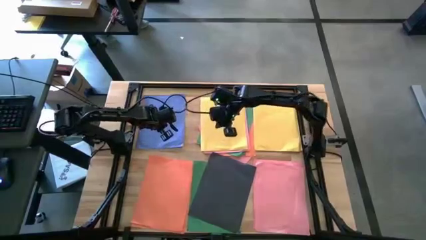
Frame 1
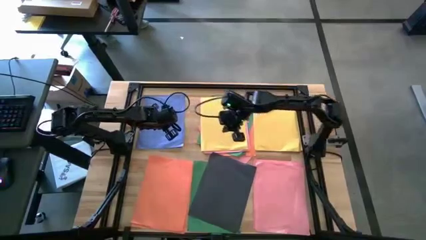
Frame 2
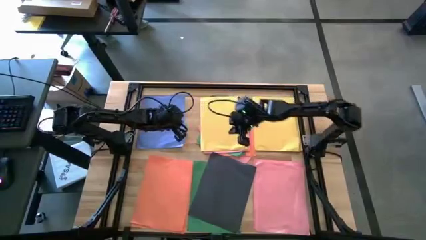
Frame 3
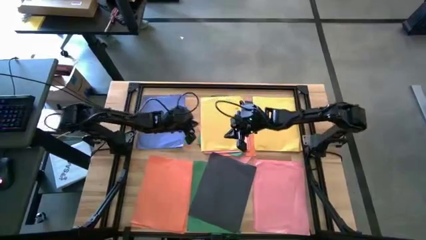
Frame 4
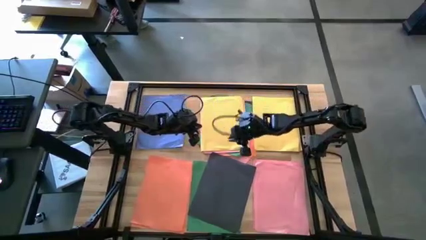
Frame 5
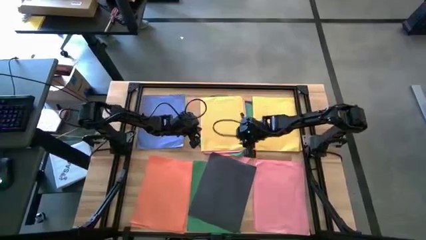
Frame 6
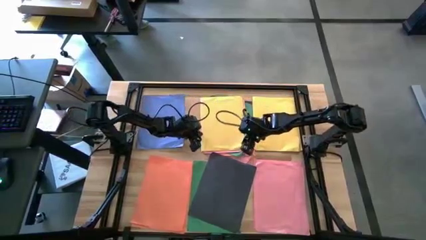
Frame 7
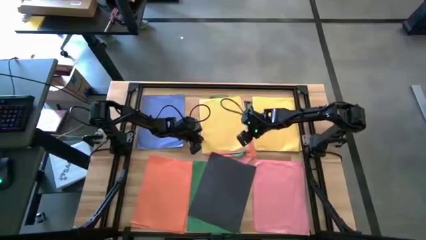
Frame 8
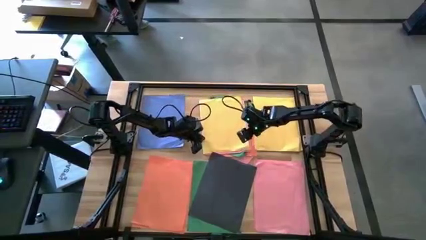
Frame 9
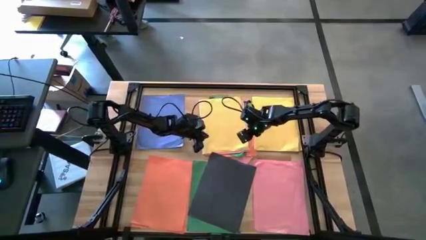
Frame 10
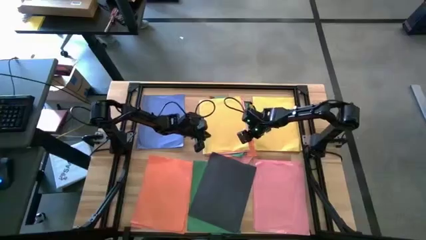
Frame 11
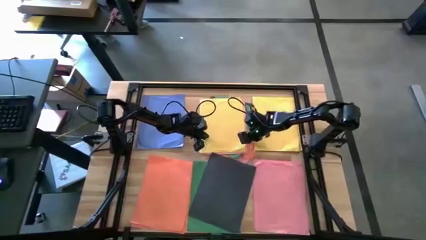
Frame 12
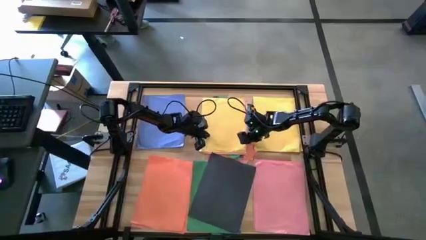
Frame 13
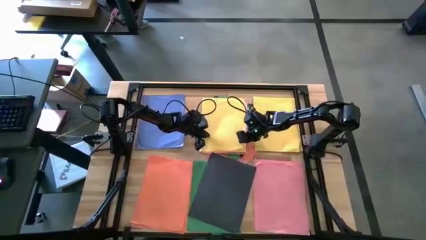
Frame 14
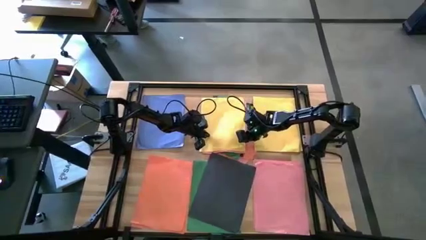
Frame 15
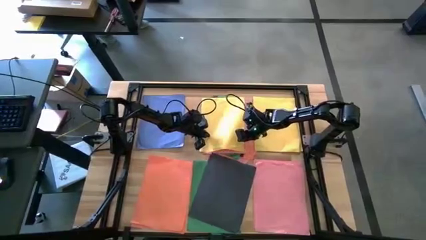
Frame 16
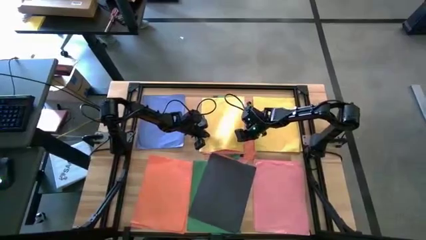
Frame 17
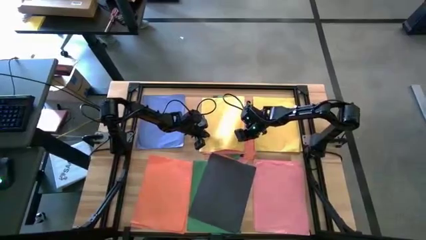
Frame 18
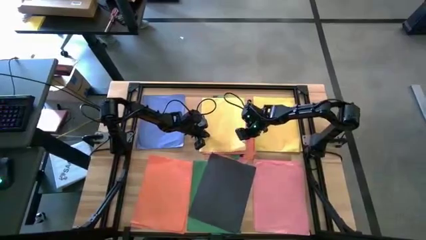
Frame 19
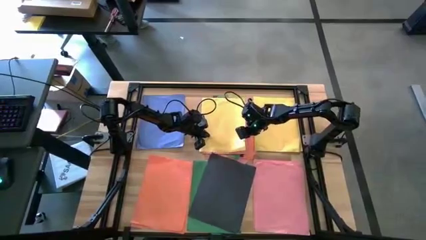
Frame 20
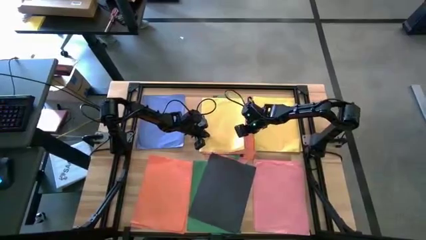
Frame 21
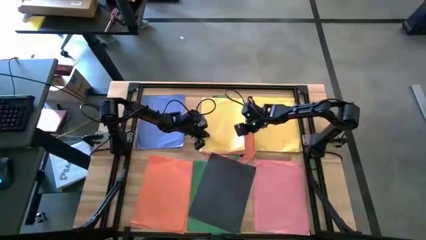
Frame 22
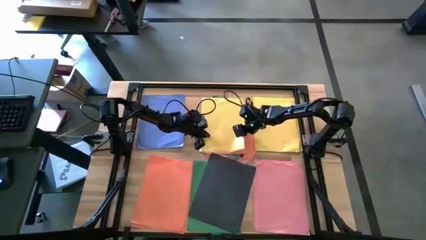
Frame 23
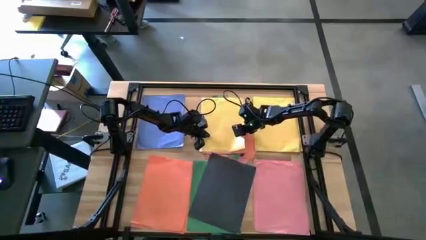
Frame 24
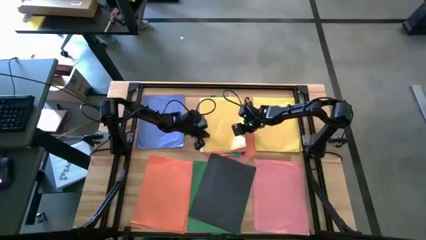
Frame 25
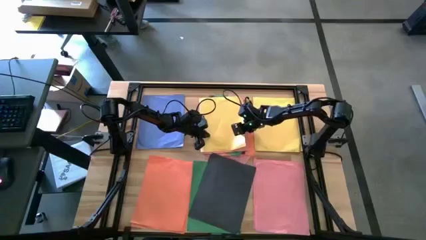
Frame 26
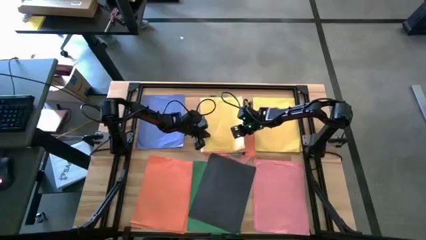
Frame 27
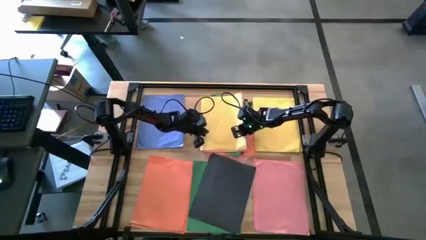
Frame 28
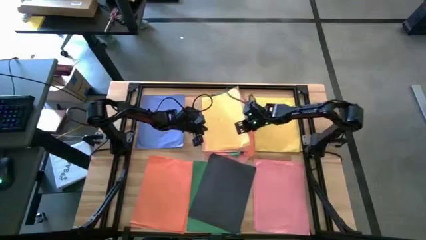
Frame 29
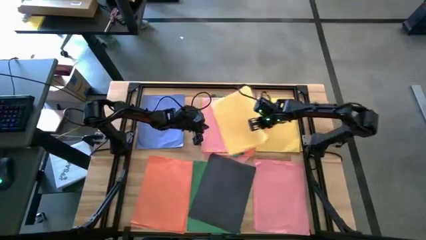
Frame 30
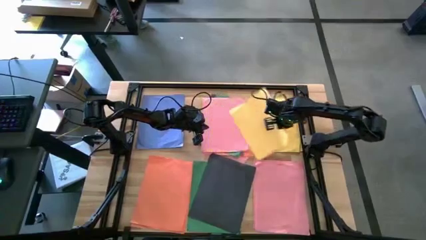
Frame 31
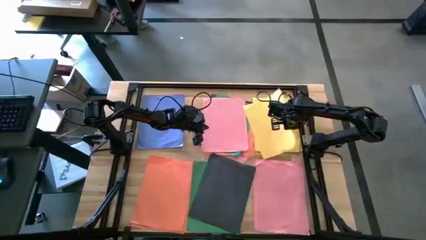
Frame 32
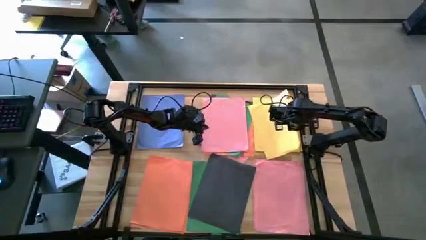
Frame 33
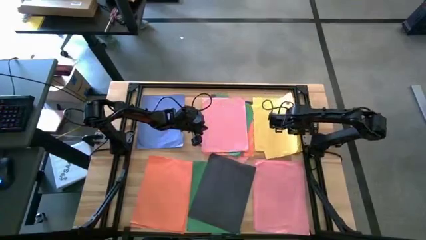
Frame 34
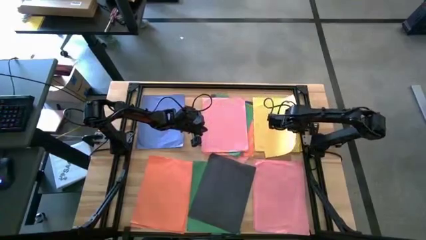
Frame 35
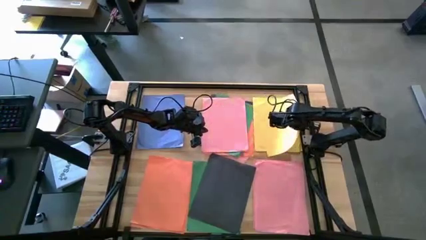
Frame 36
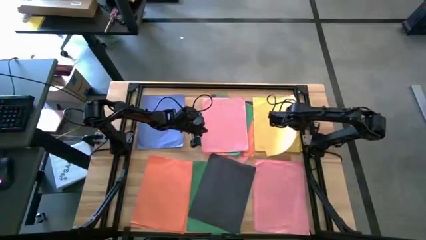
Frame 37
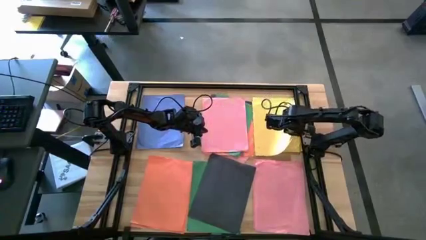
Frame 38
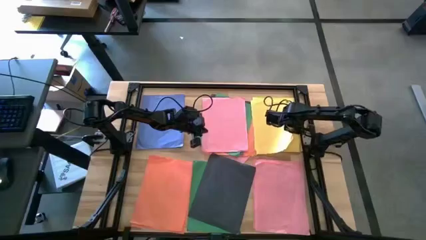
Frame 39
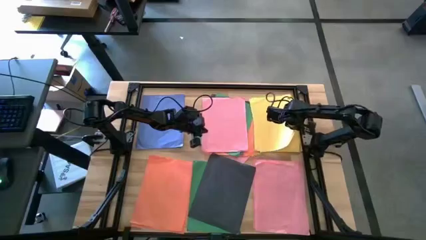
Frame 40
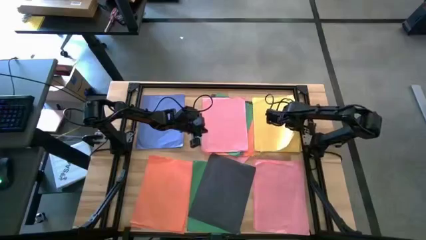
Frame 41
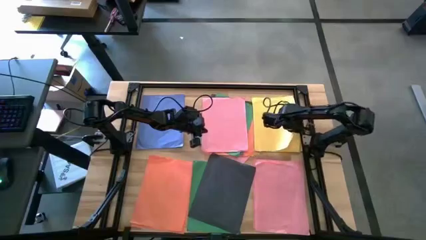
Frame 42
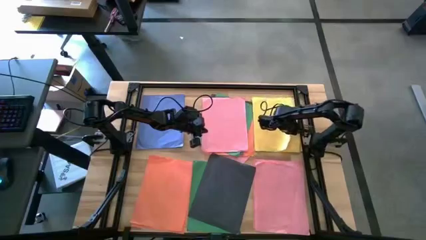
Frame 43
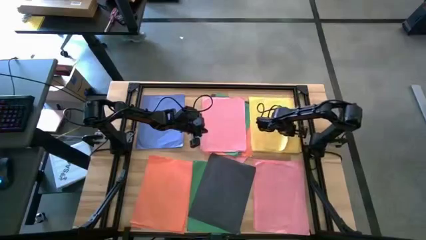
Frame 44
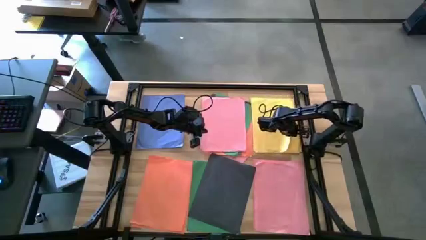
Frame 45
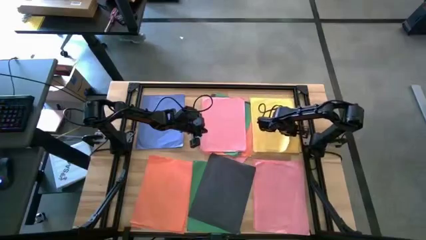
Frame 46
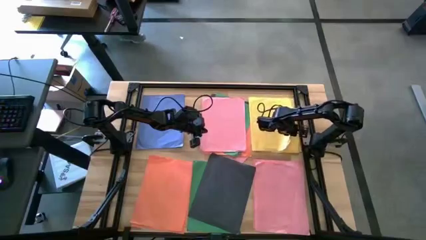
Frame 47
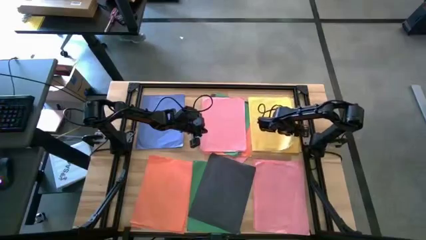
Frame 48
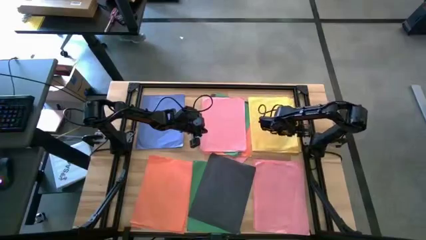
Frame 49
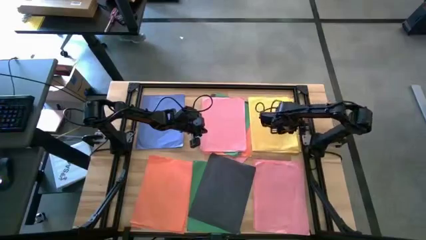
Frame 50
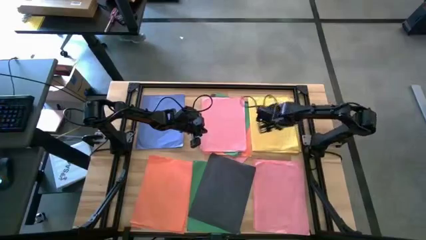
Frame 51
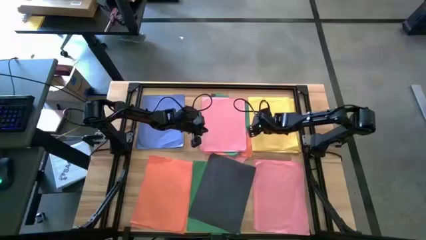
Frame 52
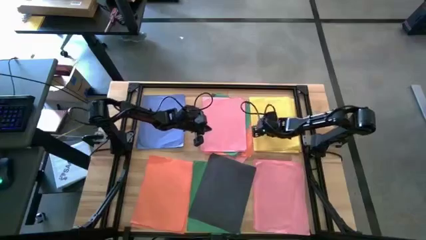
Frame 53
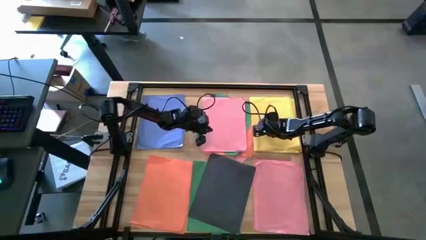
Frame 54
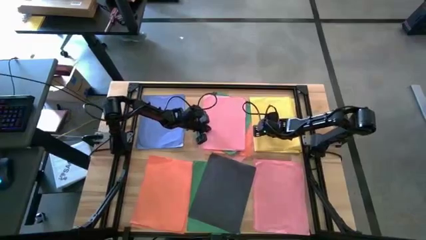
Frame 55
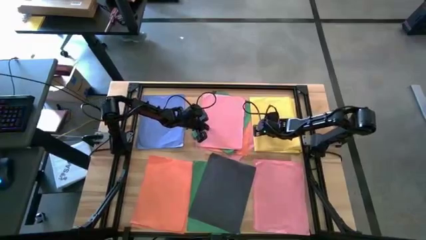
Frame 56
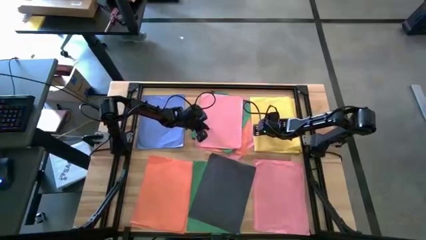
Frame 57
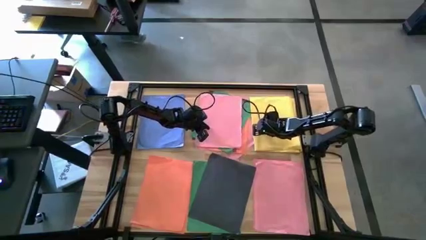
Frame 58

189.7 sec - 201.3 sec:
Task: Organize paper
Stack the left yellow paper on the right yellow paper
